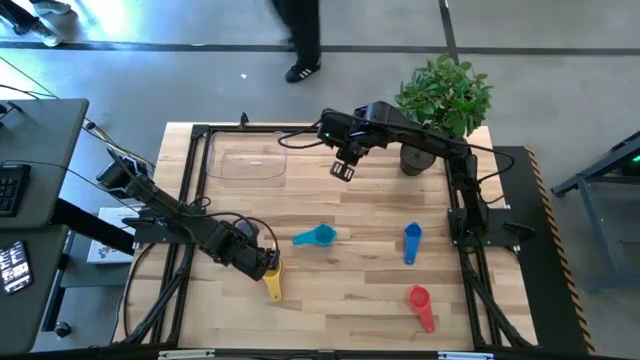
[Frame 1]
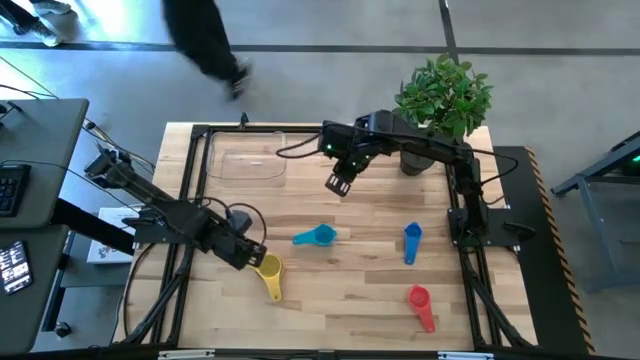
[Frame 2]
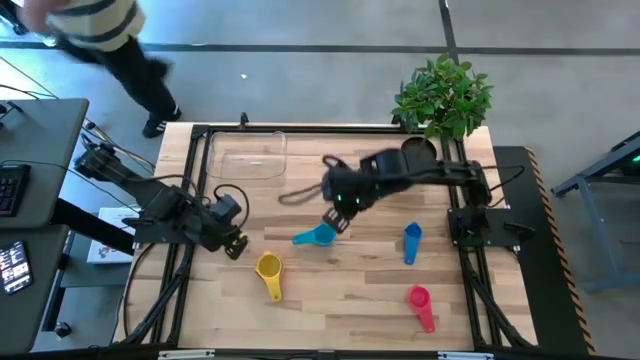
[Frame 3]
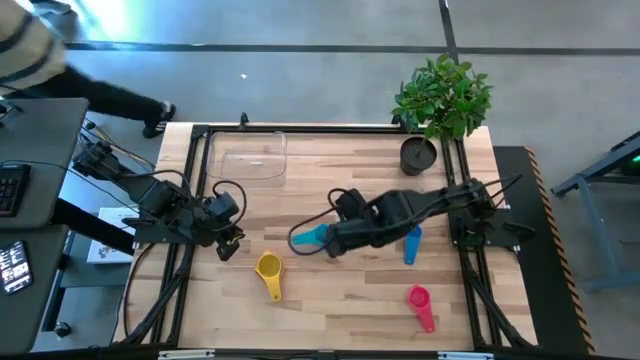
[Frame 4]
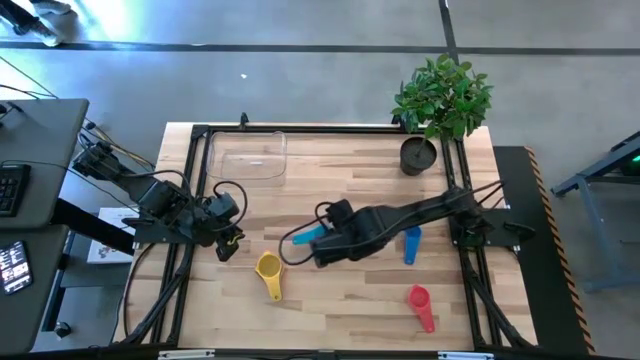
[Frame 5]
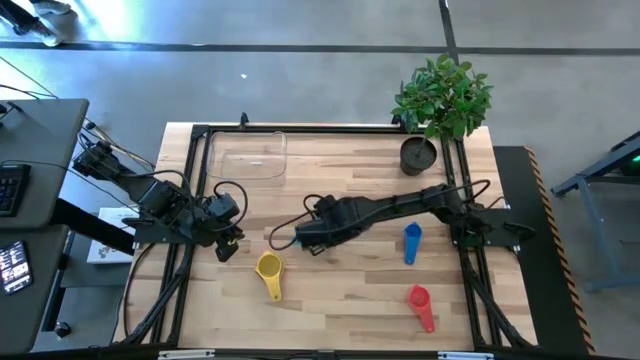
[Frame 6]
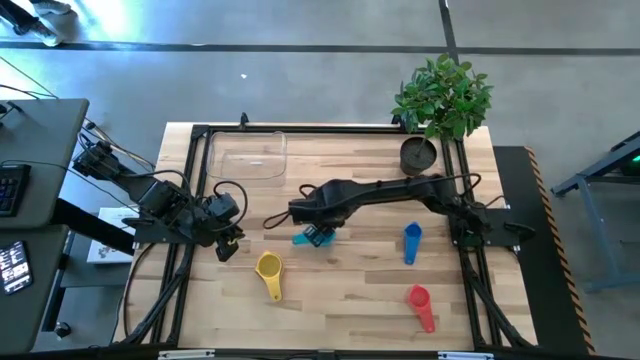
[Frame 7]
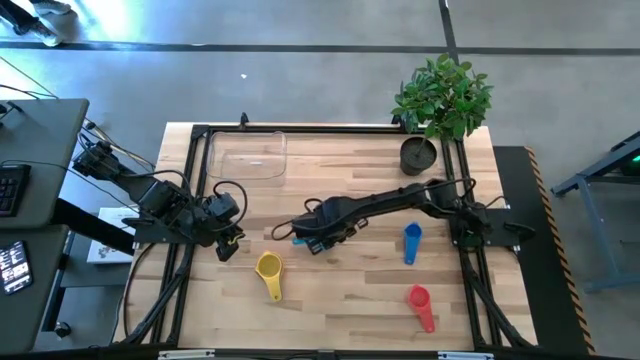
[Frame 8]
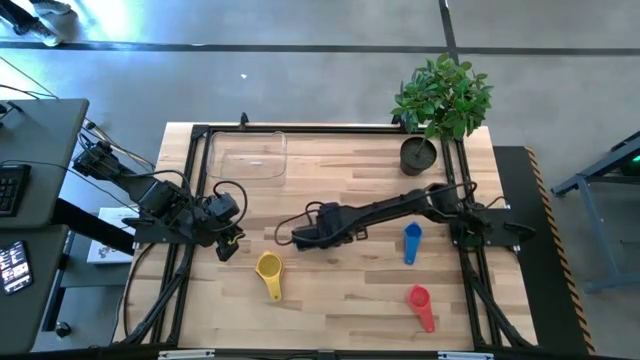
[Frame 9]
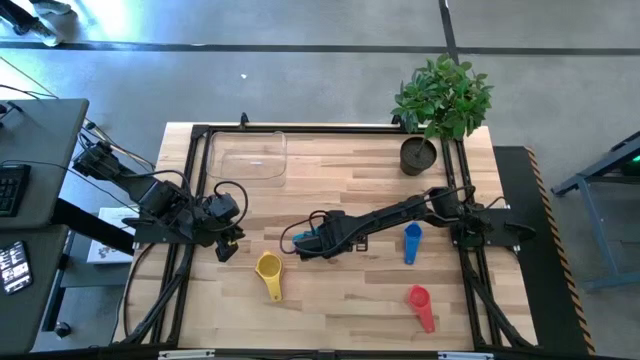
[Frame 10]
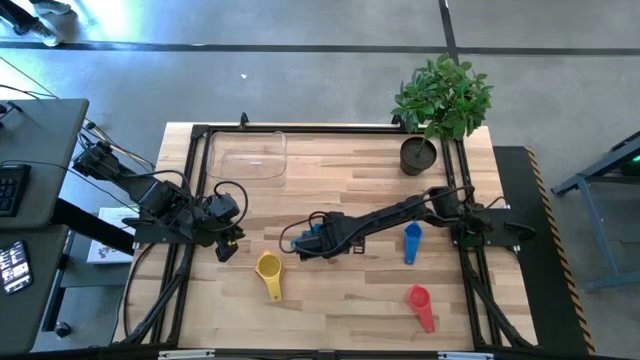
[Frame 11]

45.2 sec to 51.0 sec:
Task: Nest measuring cups in basket
Stack the light blue measuring cup on top of the yellow measuring cup

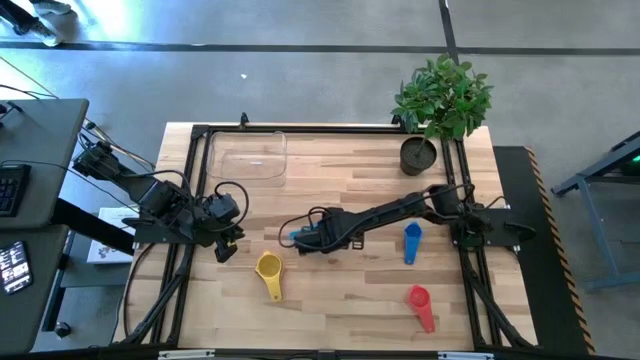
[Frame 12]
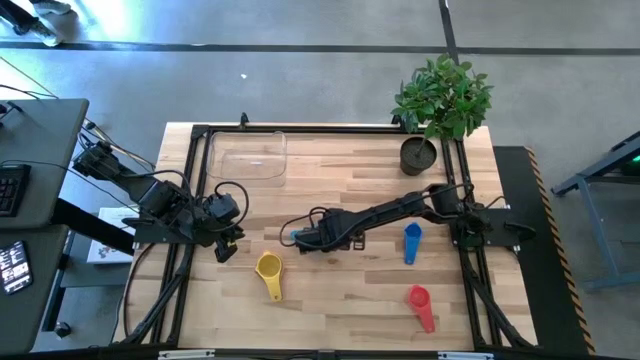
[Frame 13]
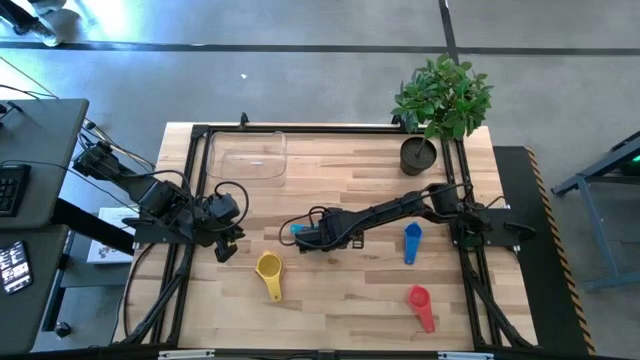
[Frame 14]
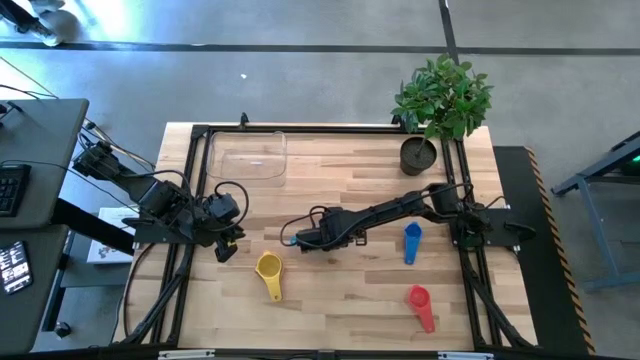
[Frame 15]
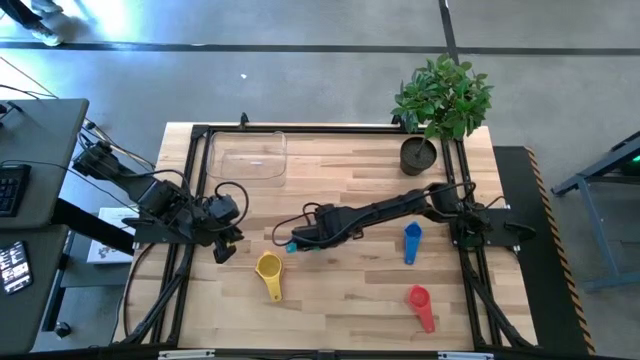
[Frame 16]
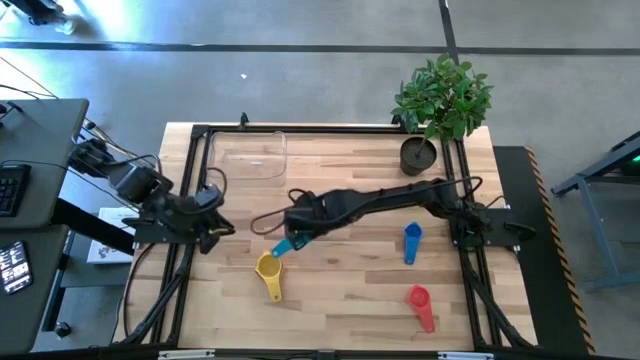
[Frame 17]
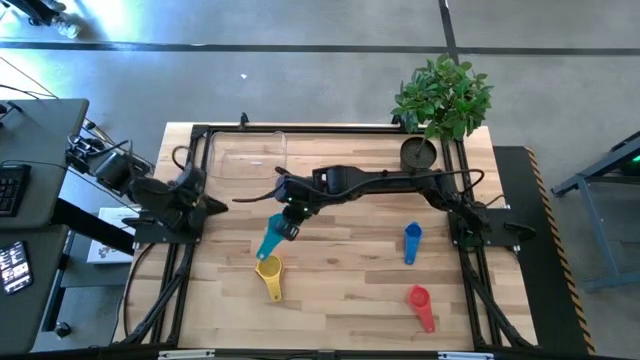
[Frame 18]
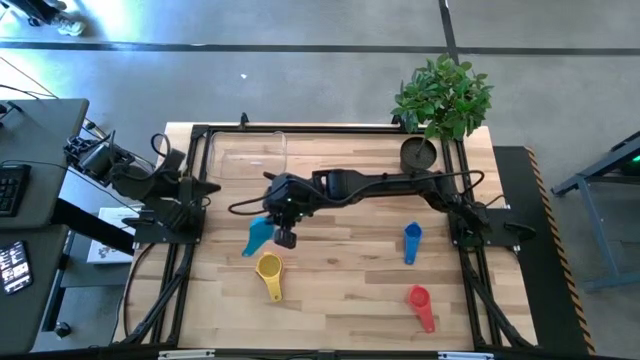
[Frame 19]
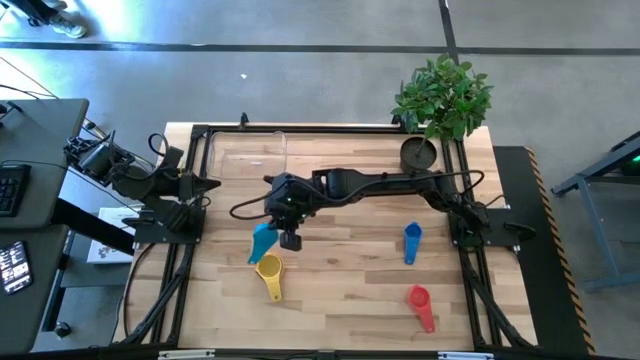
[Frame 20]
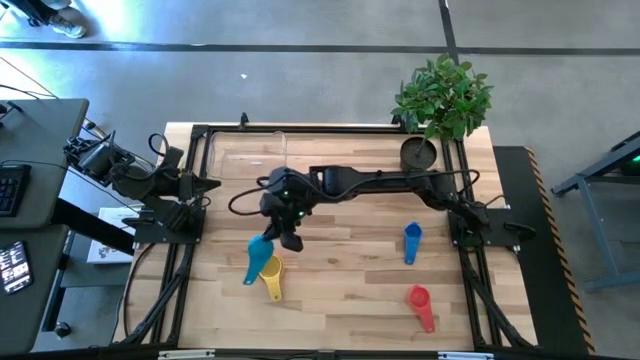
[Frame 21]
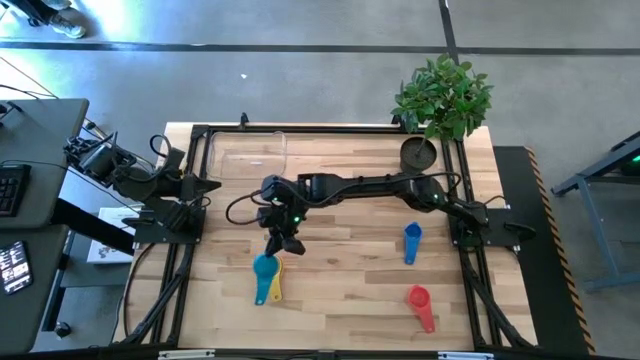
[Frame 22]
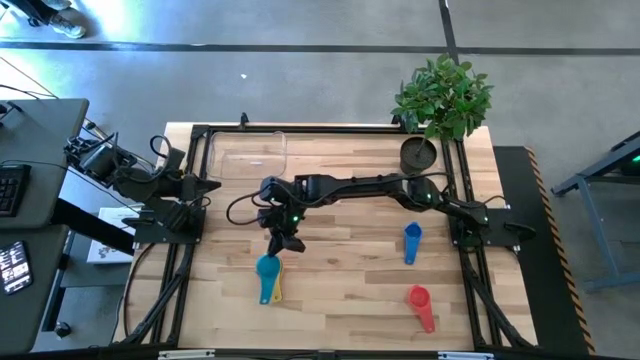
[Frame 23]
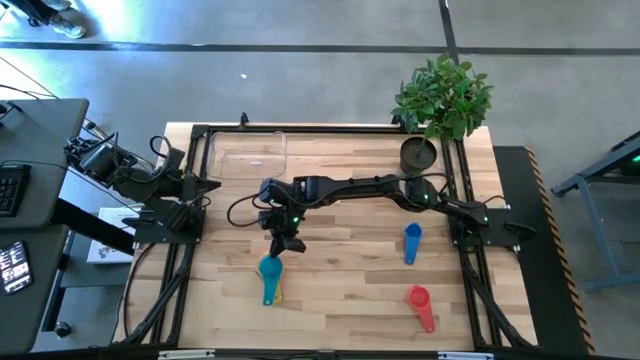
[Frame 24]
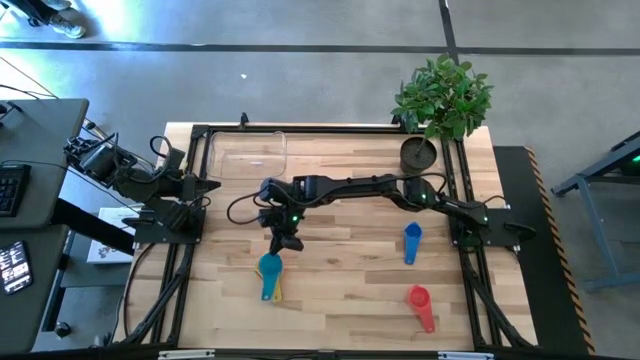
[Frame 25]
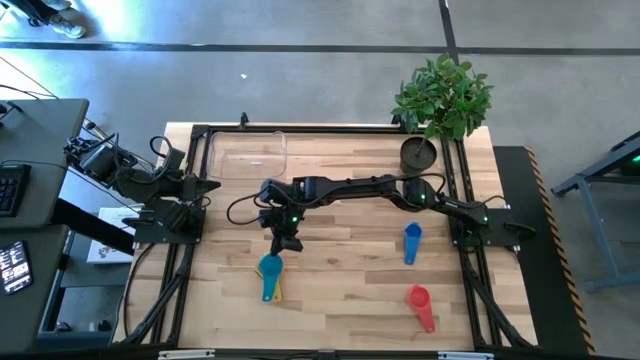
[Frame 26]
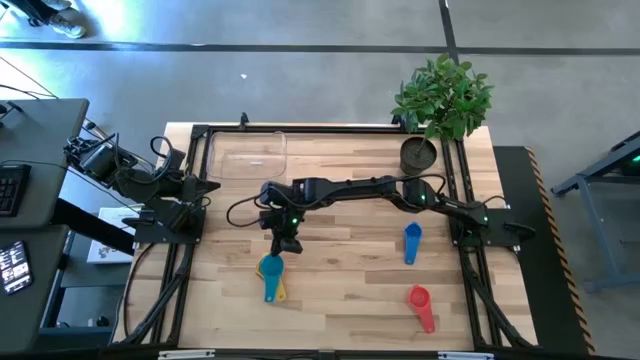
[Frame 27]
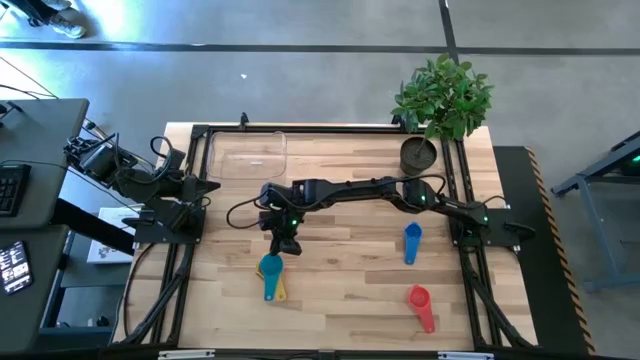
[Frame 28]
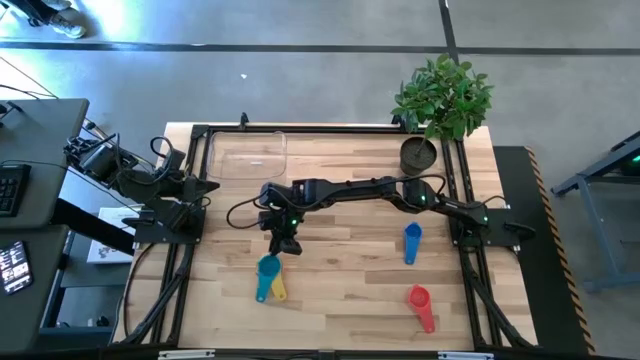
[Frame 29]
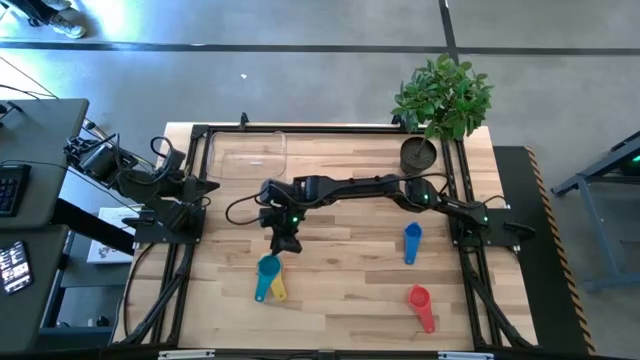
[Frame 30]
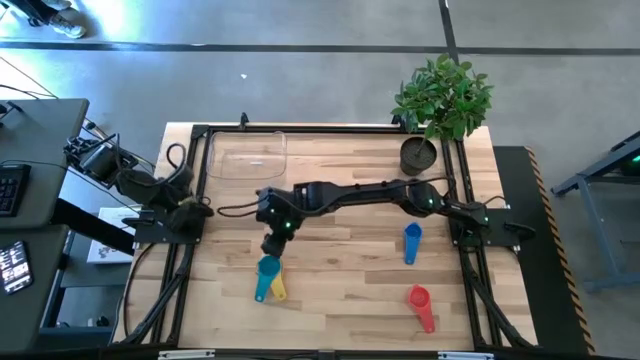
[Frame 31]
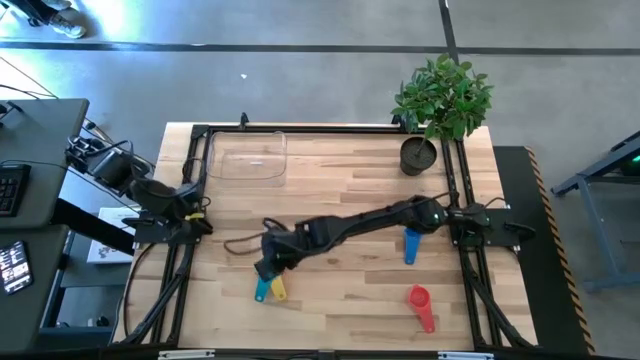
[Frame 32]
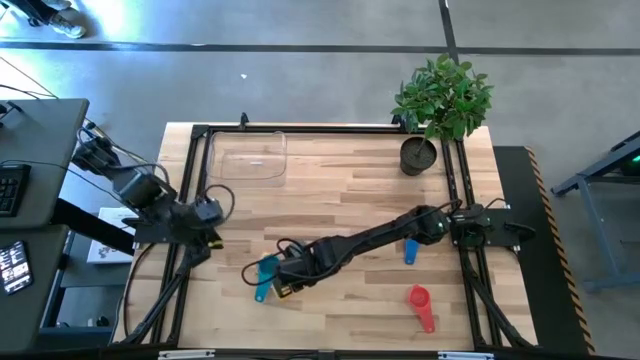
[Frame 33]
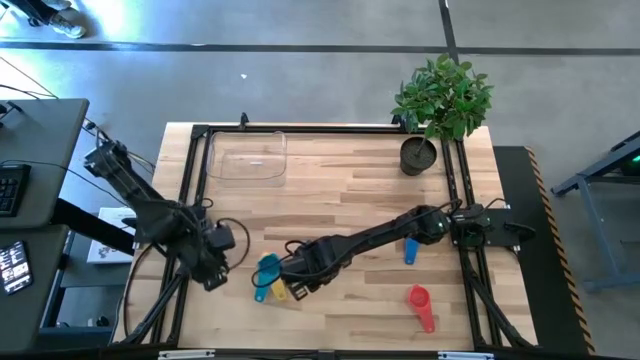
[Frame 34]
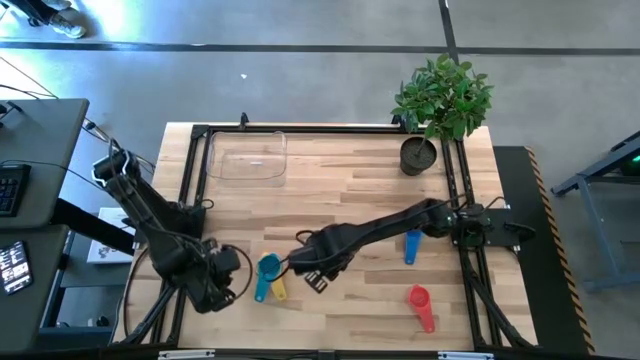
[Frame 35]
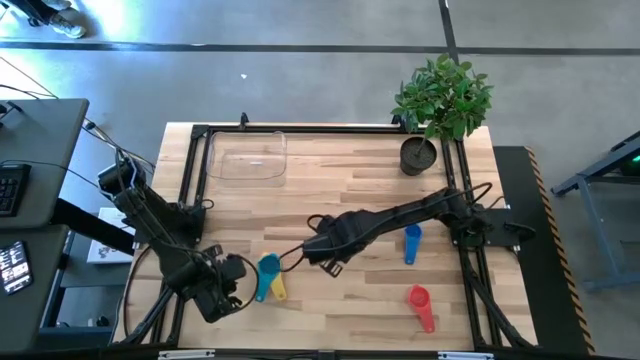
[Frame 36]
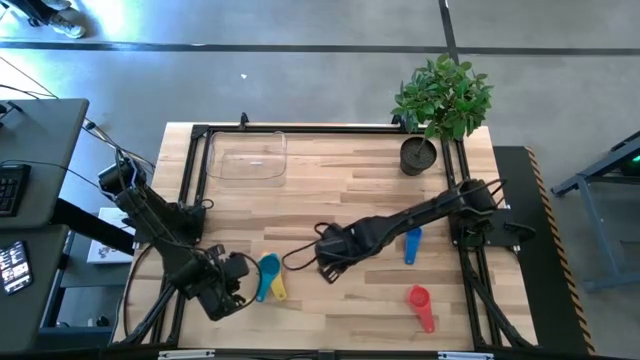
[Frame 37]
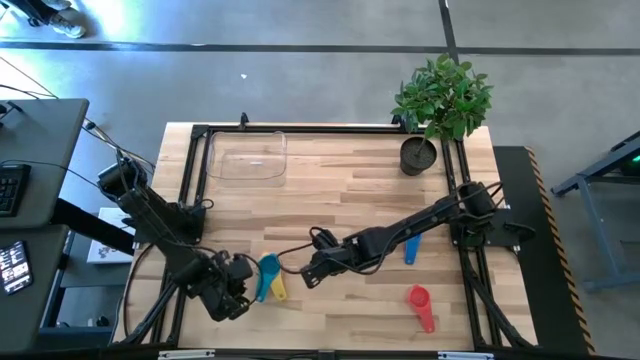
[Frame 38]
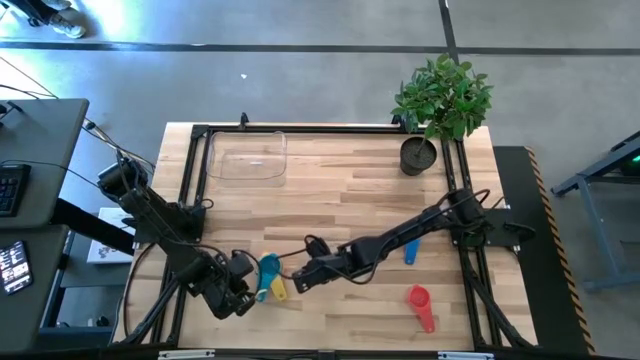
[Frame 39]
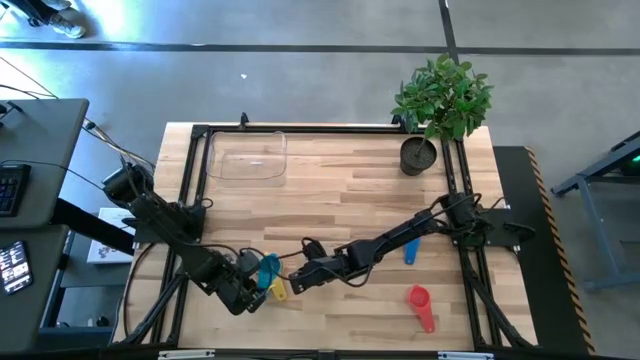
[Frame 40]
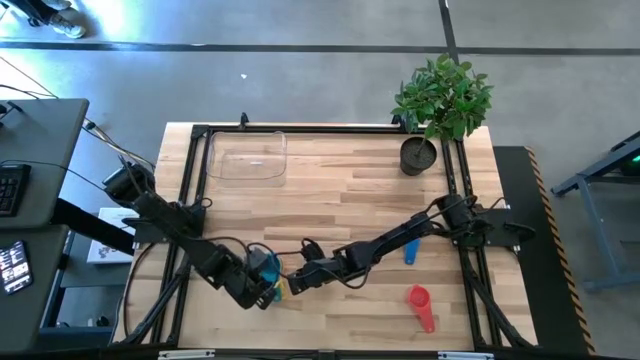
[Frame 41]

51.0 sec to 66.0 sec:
Stack the light blue measuring cup on top of the yellow measuring cup

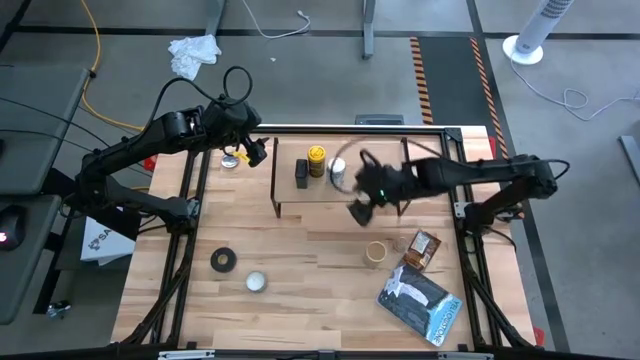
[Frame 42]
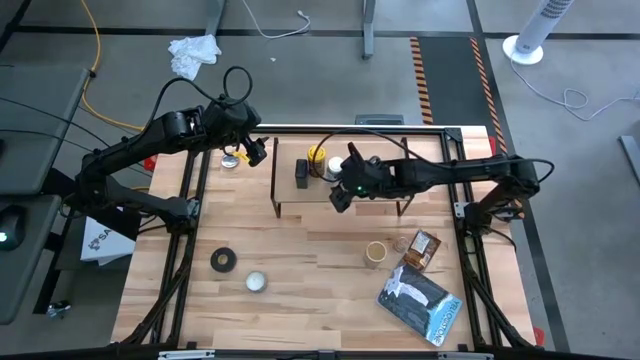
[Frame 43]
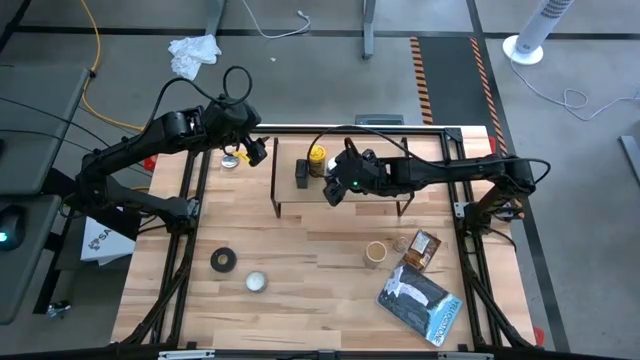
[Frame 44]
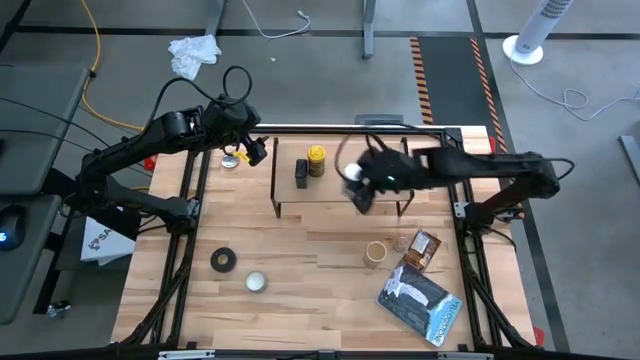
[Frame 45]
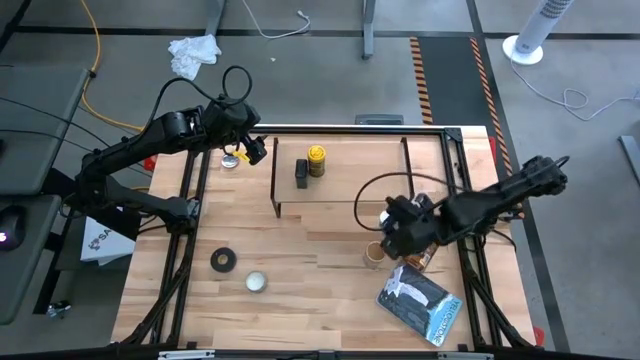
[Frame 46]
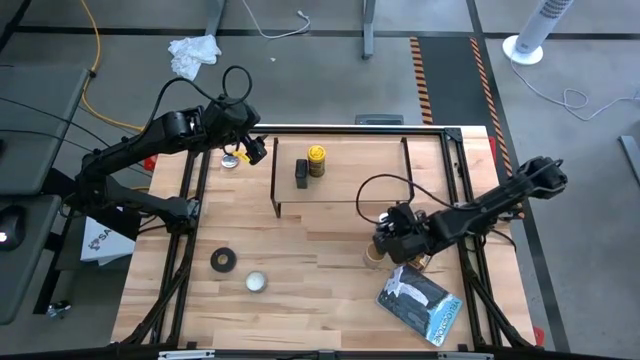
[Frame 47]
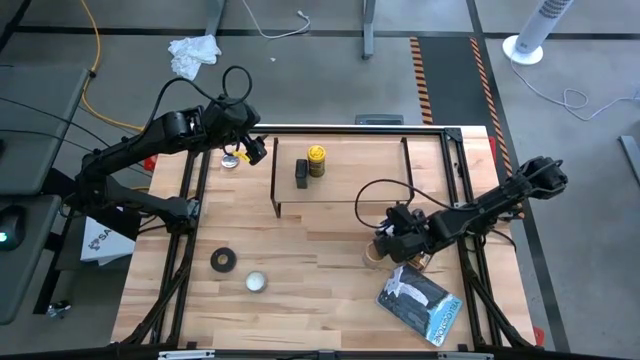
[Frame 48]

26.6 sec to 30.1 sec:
Task: Shelf spices
Remove the white seasoning bottle from the shelf
